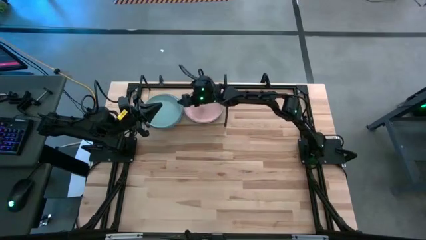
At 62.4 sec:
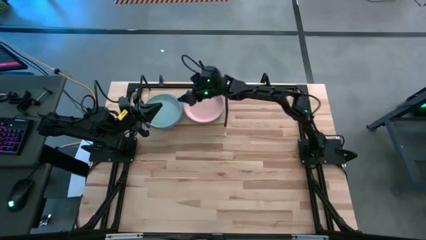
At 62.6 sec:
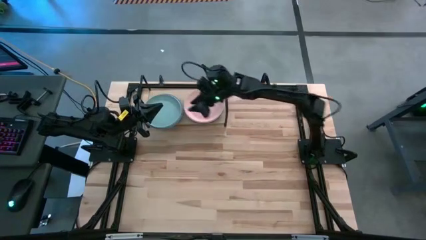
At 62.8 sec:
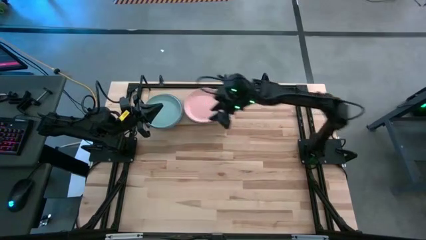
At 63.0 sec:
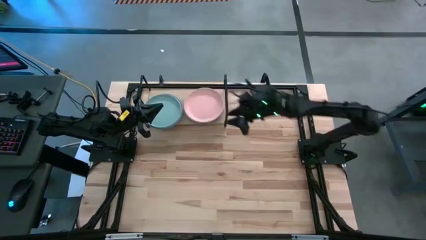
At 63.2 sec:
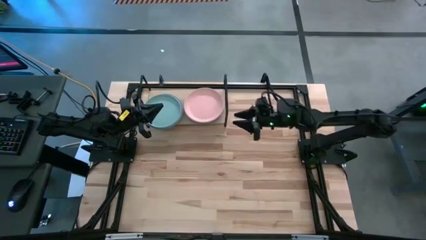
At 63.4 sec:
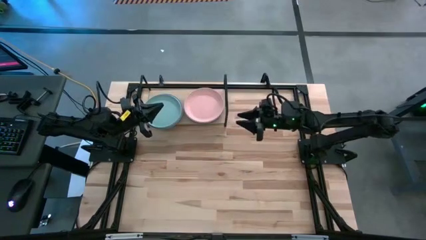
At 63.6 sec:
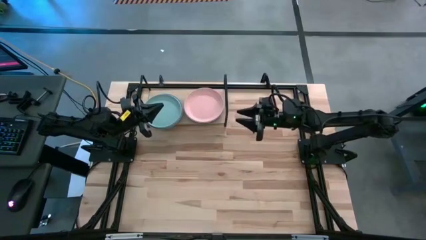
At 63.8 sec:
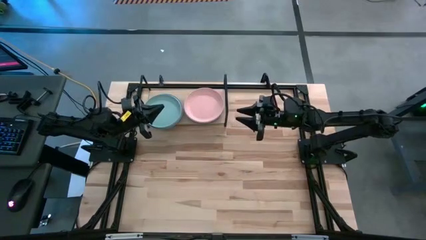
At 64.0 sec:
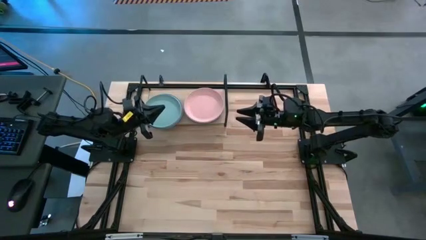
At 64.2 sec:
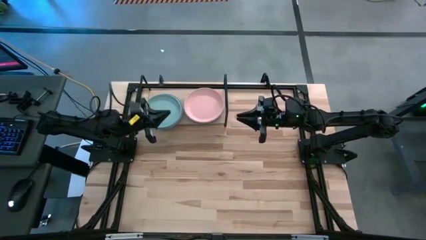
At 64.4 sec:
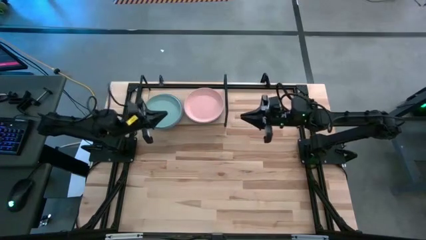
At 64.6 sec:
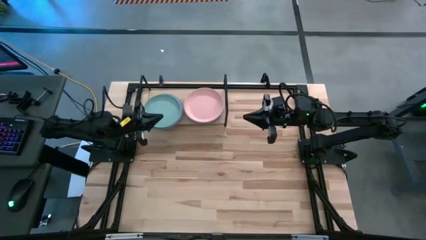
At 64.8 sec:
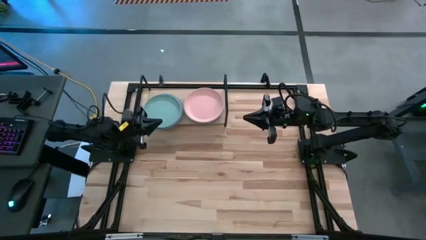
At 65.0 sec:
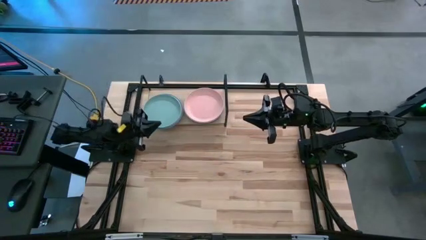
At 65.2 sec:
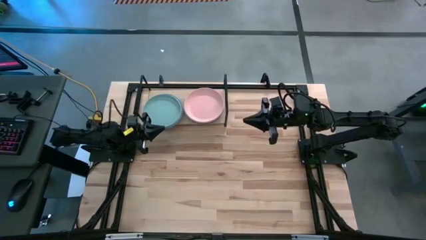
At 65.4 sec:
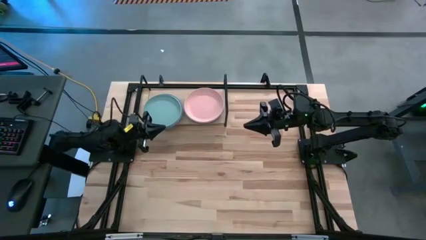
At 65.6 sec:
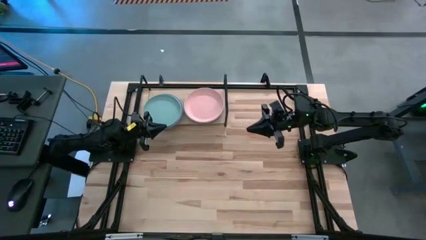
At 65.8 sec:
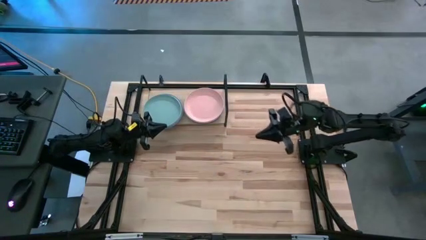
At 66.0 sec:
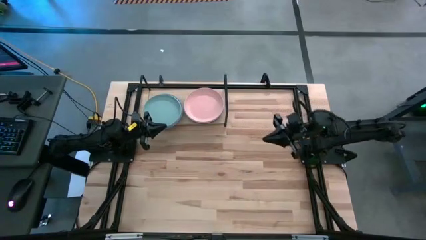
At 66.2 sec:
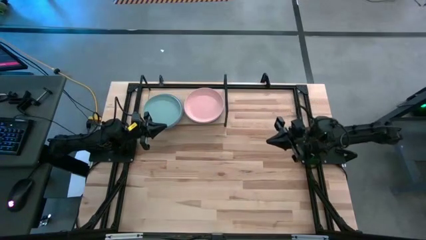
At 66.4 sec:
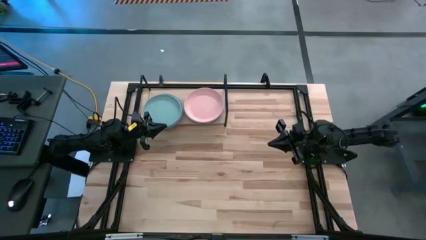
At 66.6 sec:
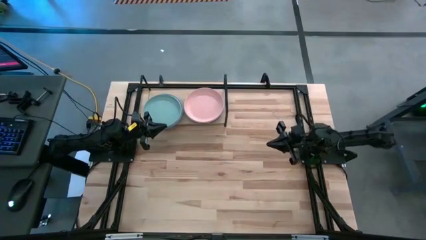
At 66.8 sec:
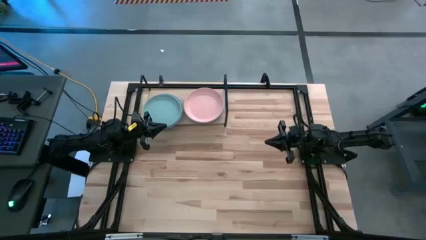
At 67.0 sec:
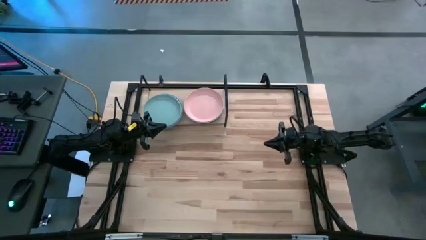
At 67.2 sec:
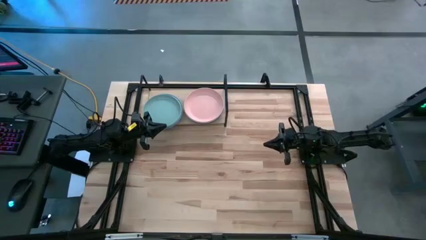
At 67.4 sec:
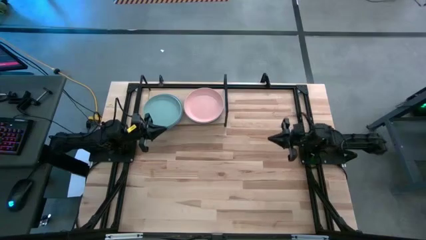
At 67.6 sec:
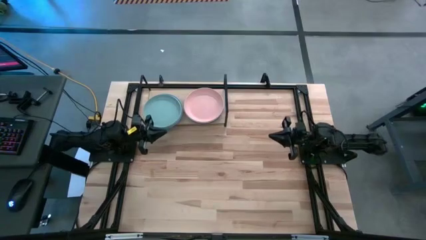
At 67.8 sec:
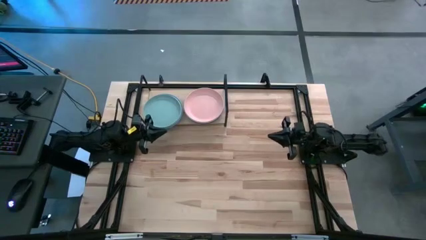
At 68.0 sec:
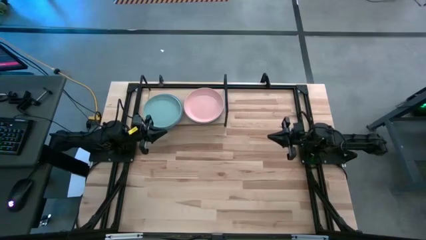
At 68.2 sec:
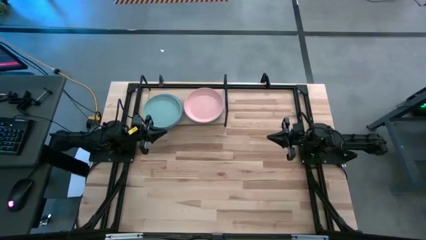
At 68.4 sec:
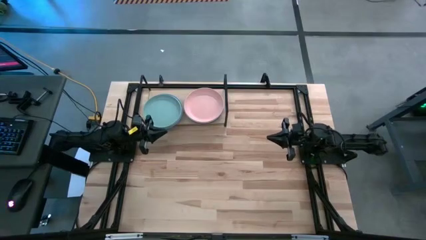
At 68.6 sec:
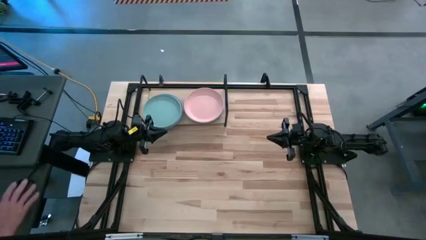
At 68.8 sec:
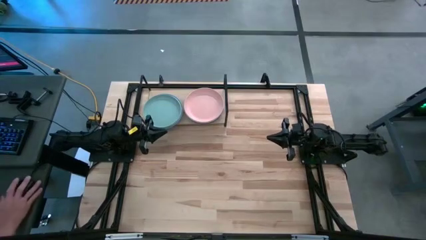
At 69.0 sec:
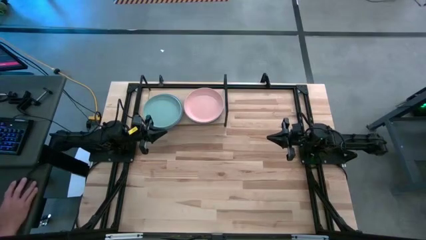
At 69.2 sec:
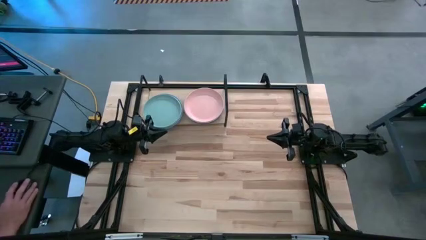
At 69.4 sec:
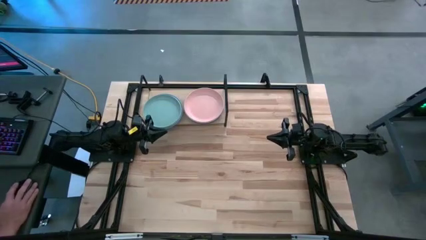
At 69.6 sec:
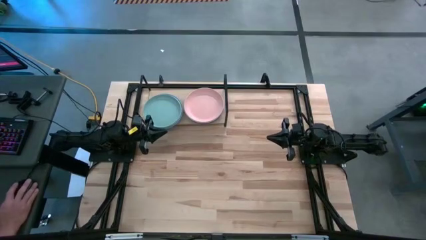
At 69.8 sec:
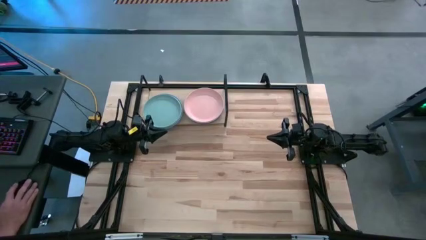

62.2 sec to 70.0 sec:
Task: Place and stack plates onto a shelf
Return to Home Position

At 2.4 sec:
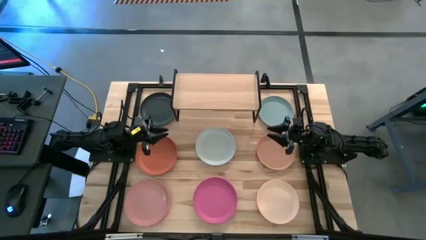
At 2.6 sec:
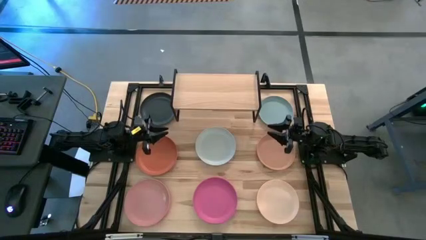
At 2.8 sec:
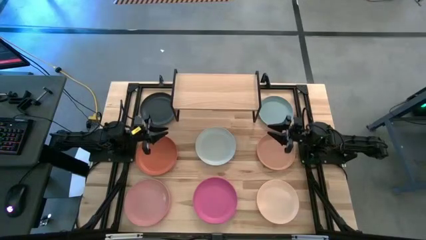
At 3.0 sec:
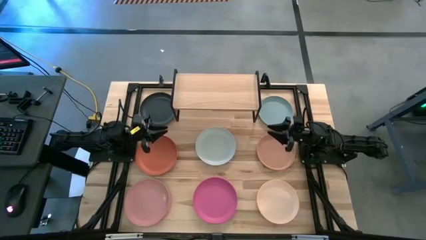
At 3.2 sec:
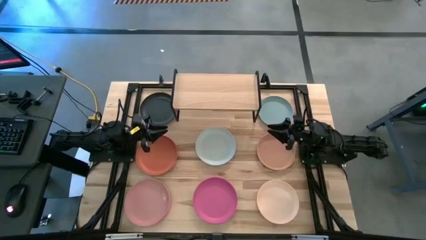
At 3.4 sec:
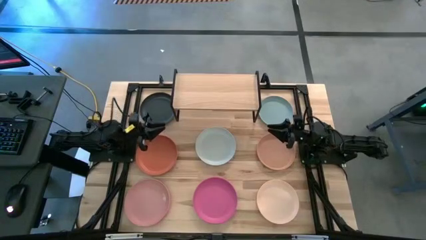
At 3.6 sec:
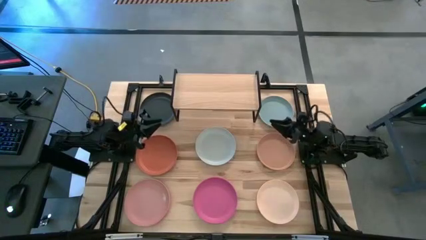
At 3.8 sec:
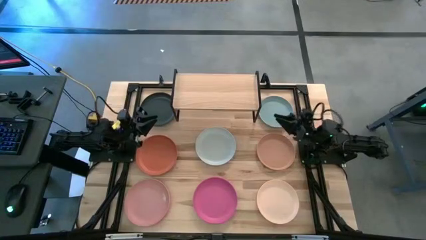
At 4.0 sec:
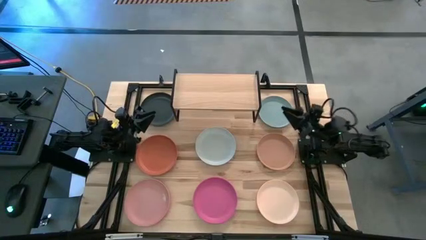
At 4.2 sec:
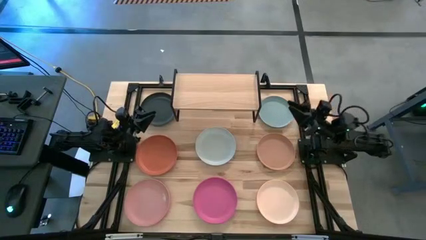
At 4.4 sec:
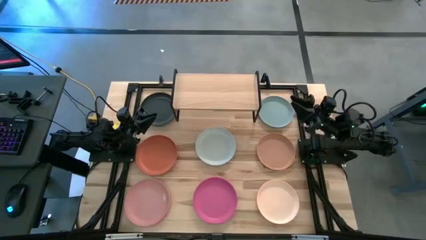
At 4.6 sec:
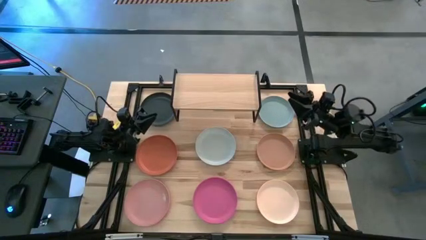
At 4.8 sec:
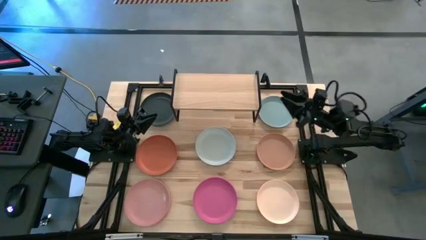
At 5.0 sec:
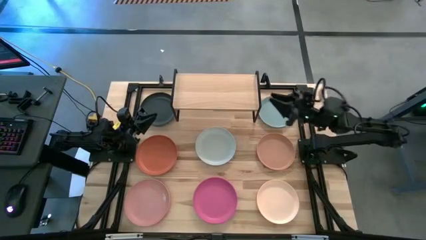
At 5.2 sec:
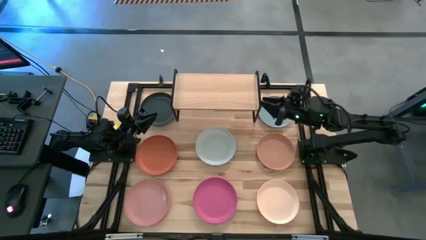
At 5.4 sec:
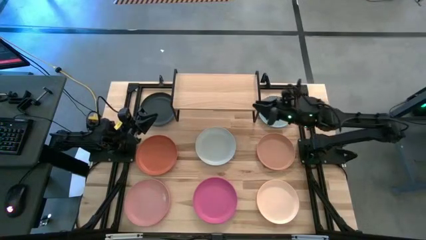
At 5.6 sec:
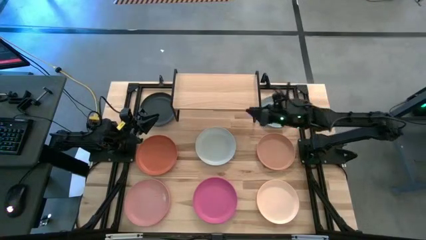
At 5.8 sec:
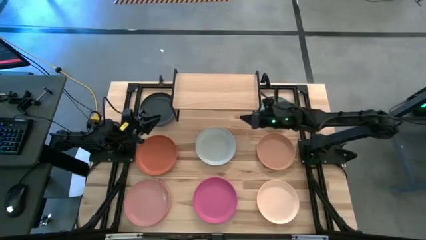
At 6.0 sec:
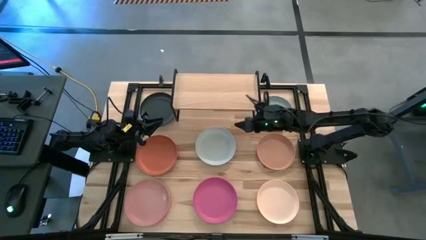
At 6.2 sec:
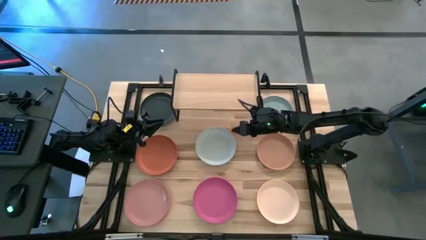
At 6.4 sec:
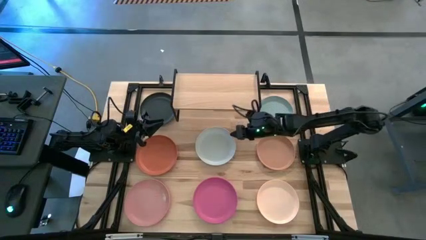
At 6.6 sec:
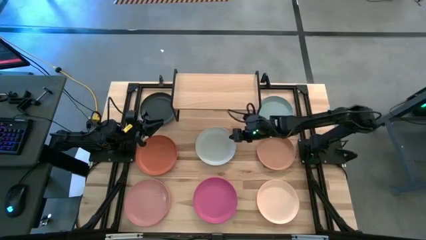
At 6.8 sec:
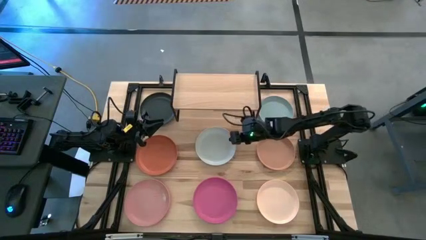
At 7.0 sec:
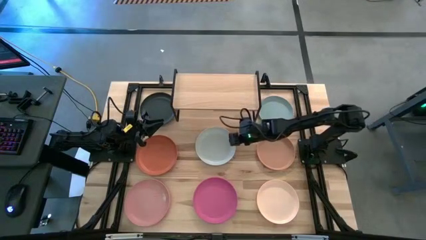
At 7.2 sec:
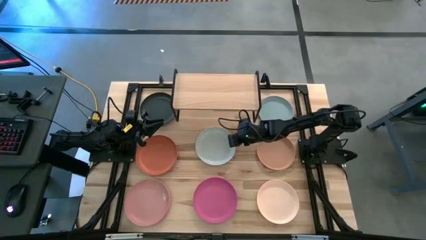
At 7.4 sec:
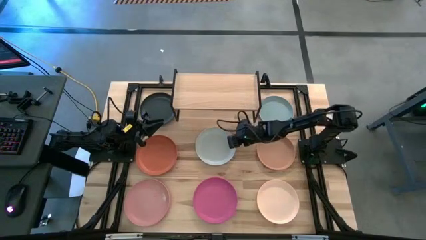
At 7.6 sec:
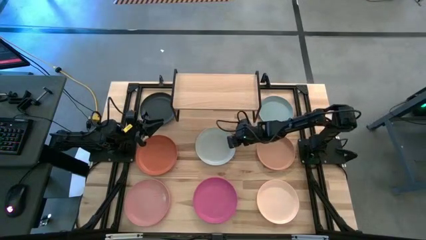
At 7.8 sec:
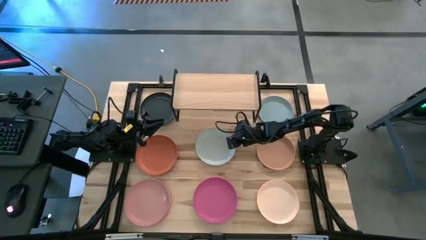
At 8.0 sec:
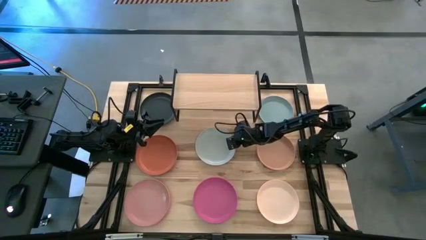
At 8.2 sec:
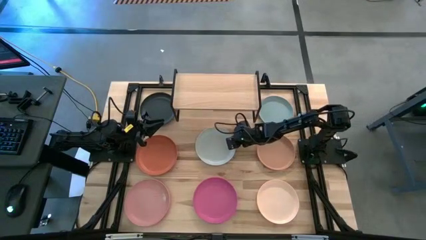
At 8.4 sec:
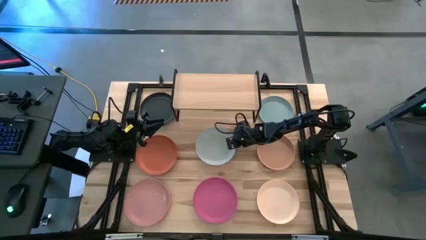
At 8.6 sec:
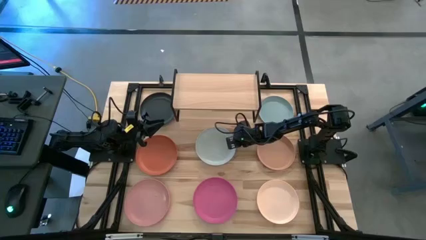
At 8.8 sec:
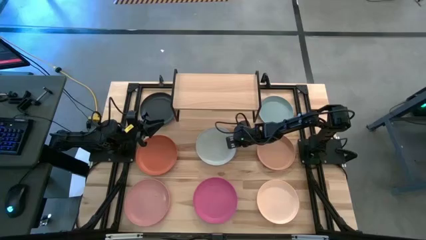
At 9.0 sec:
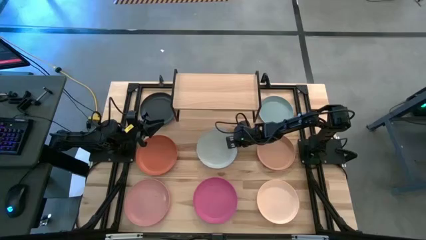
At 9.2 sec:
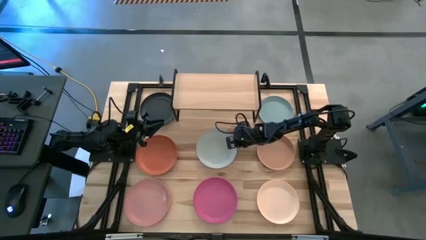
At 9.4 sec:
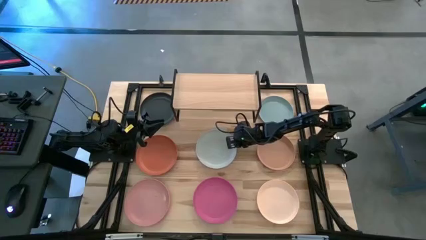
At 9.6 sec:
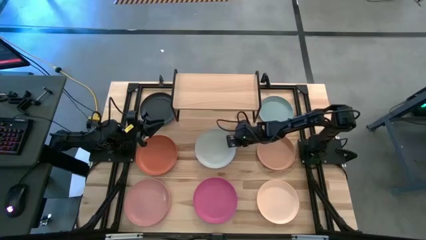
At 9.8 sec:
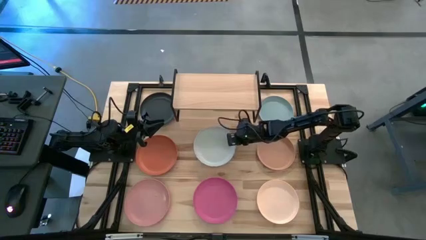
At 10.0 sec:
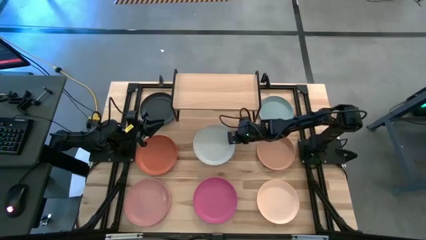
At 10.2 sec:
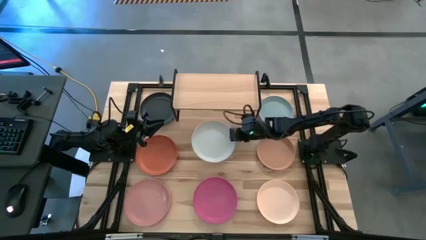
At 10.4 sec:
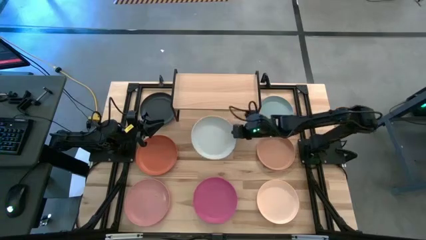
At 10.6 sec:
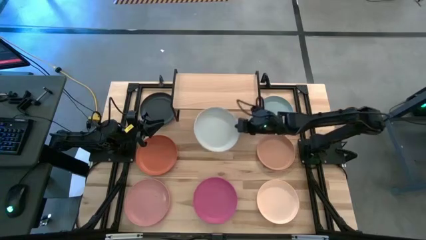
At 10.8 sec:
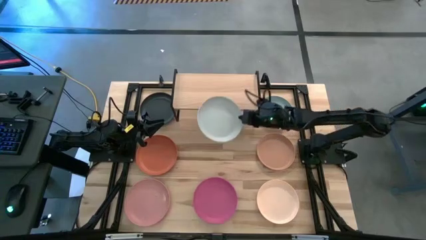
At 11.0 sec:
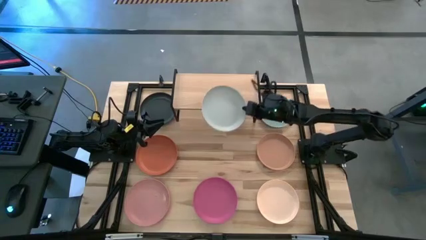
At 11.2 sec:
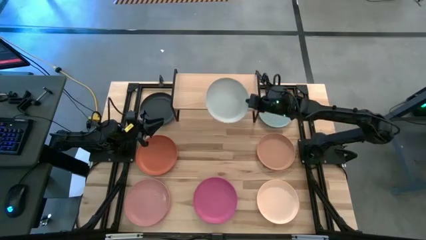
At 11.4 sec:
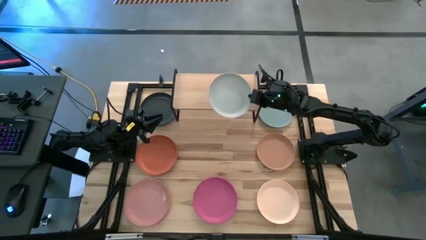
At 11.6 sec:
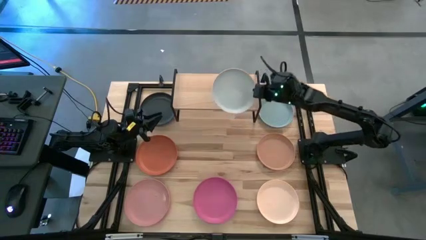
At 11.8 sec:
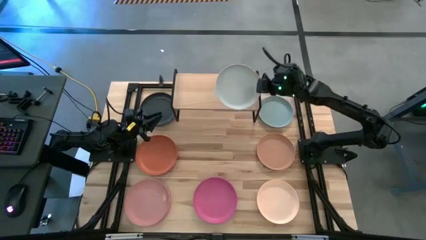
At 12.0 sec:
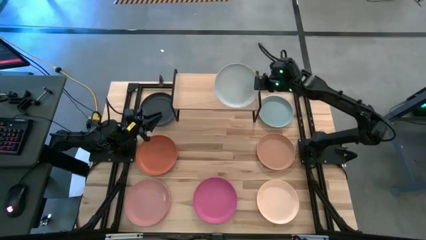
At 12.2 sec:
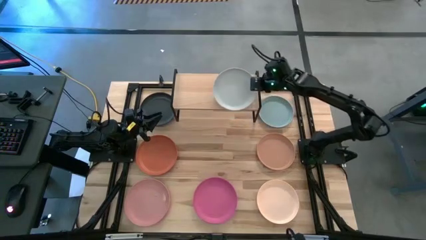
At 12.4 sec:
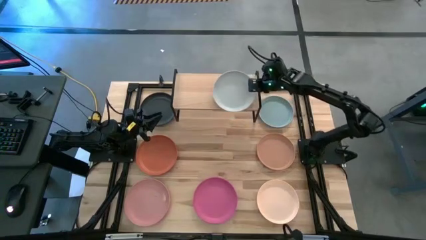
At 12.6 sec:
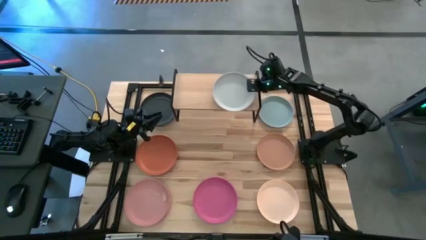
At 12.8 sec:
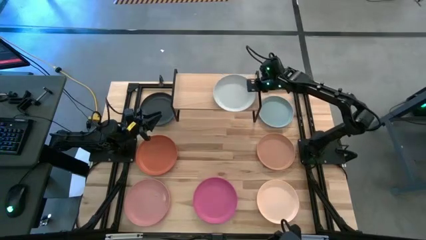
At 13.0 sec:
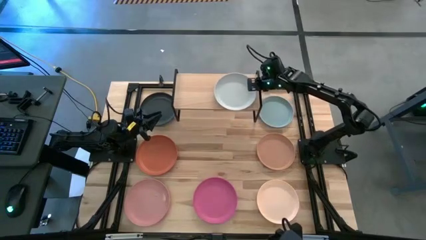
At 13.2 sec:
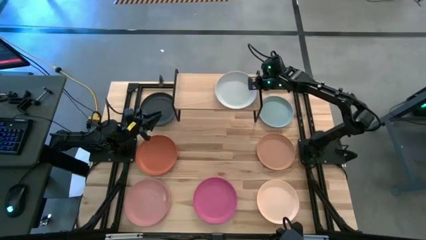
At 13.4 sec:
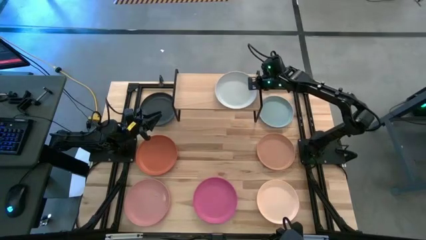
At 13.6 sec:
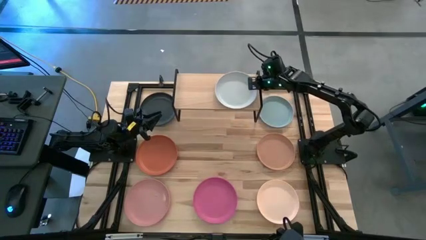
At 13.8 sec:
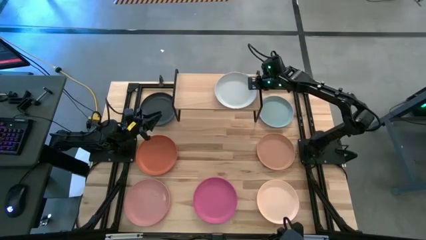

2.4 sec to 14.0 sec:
Task: Place and stack plates onto a shelf
Put the white plate on the shelf
